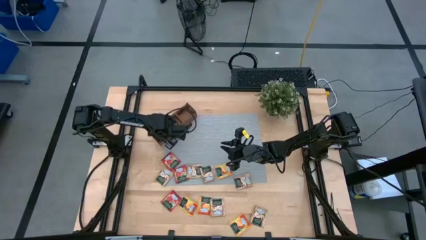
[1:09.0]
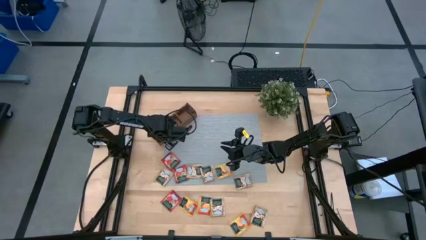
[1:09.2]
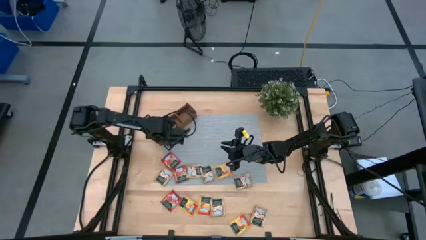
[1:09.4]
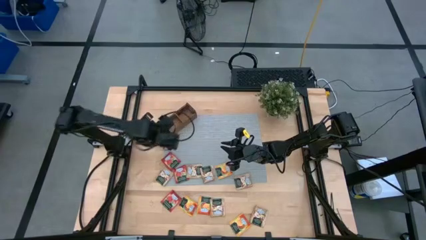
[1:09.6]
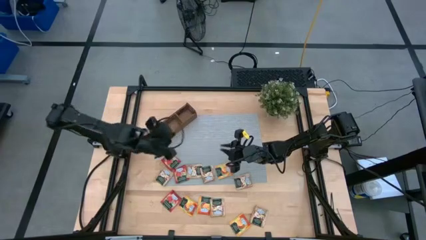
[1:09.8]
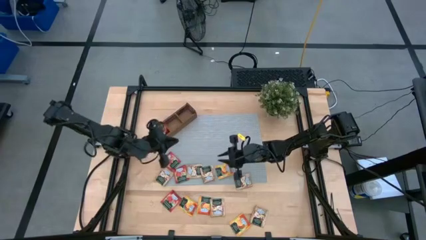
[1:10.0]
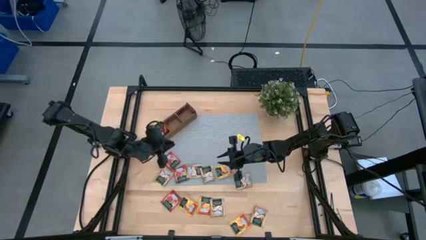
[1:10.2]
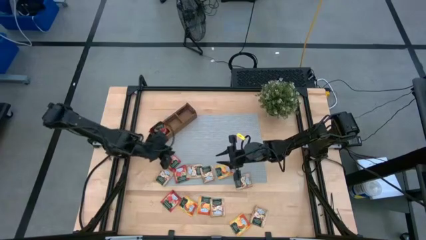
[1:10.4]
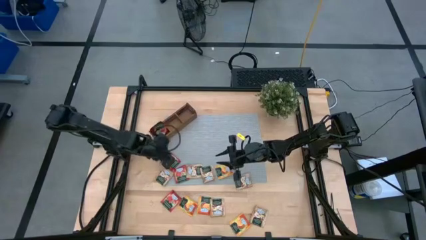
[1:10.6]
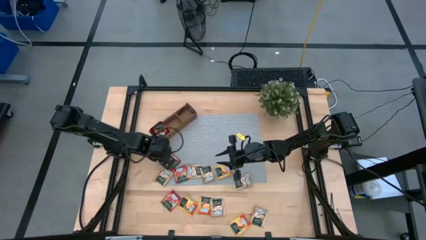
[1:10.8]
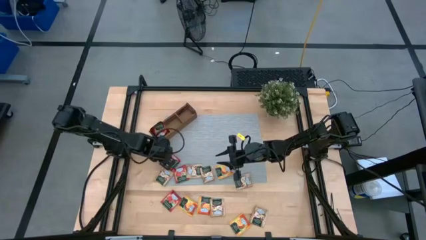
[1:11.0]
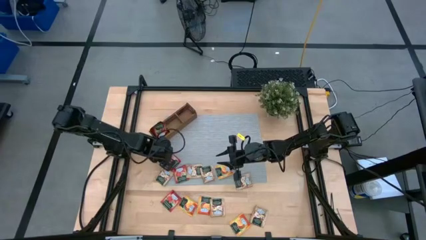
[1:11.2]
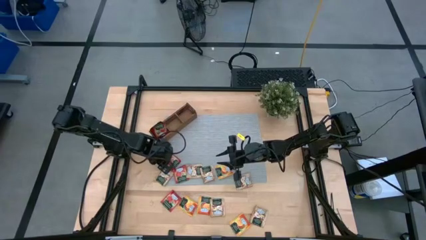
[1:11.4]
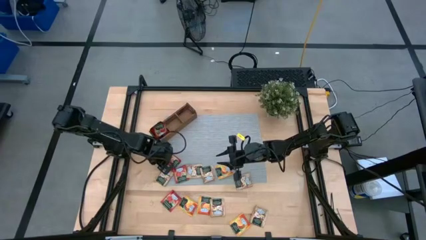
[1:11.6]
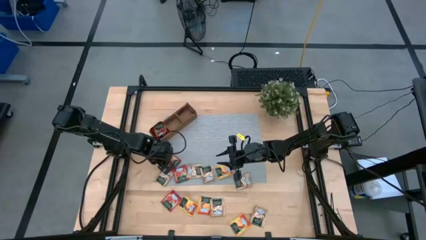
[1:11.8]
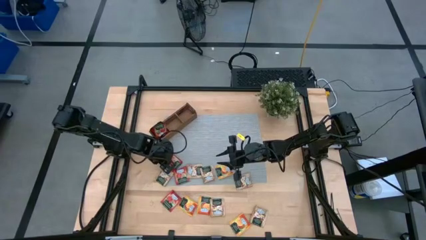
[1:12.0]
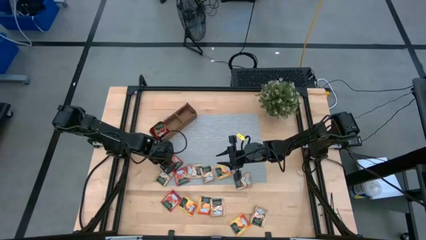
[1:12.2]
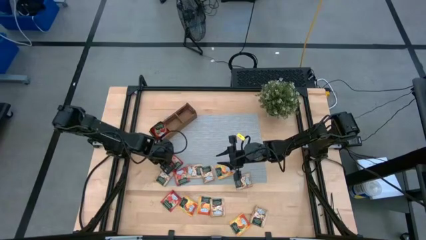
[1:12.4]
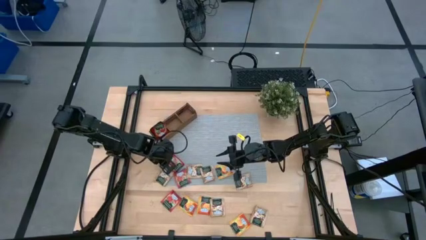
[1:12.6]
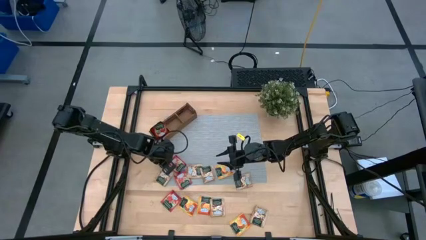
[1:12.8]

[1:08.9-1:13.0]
Task: Pick & Place Tea
Put the red tea bag into the left section of the wooden organizer

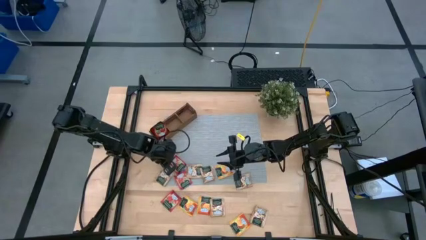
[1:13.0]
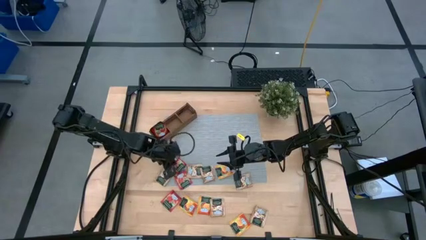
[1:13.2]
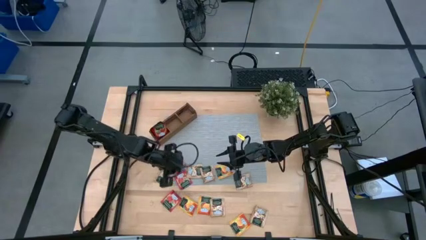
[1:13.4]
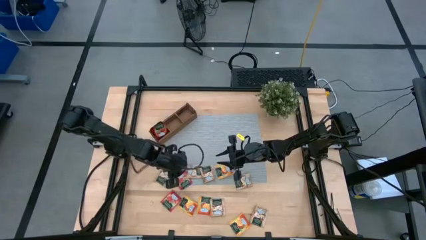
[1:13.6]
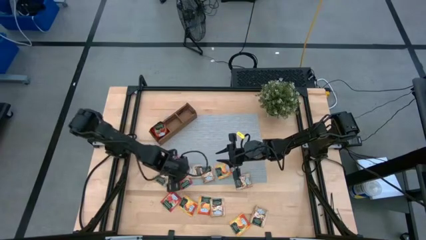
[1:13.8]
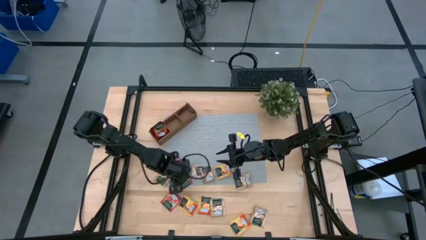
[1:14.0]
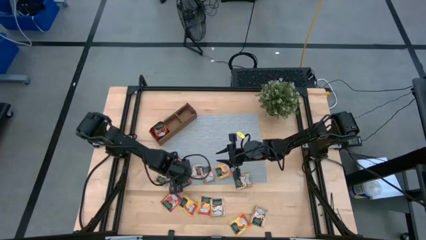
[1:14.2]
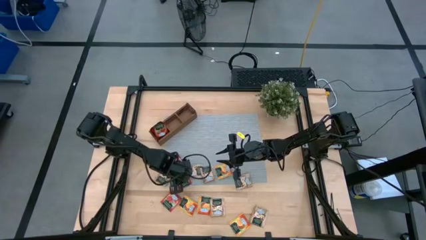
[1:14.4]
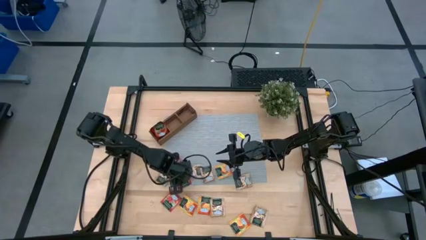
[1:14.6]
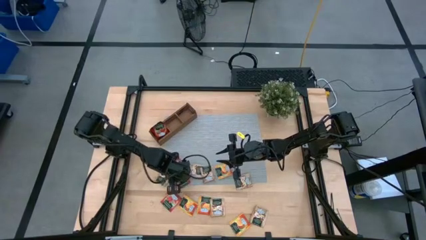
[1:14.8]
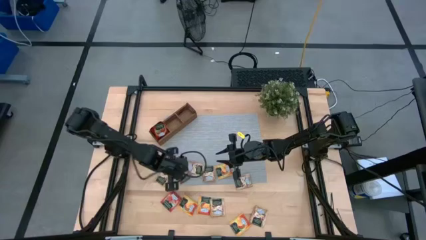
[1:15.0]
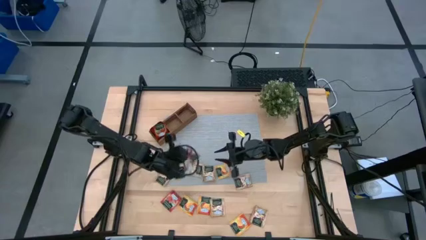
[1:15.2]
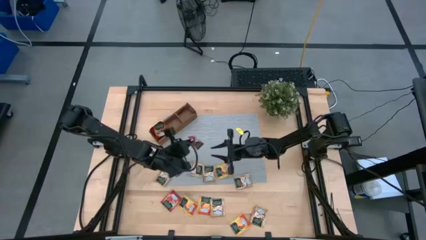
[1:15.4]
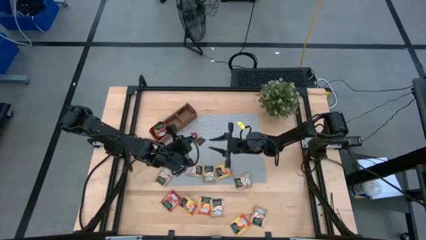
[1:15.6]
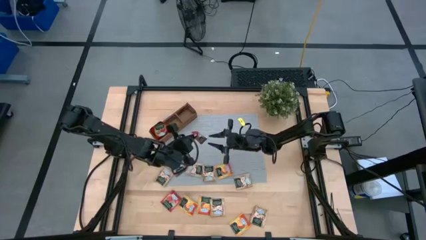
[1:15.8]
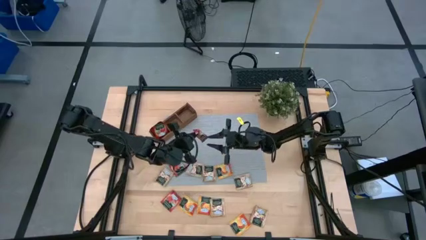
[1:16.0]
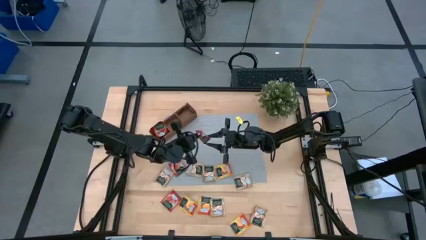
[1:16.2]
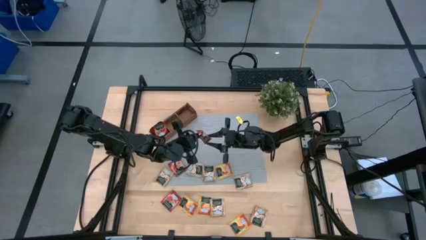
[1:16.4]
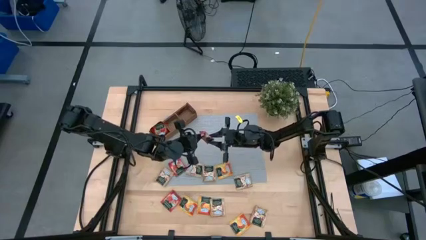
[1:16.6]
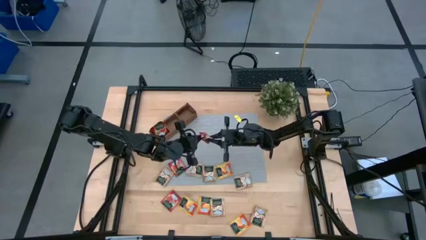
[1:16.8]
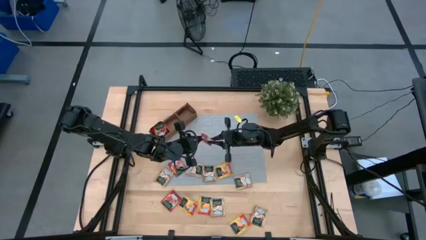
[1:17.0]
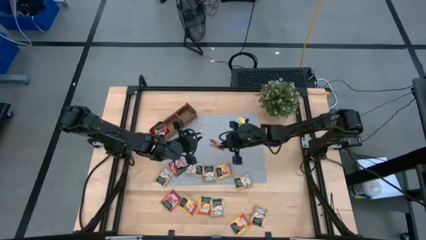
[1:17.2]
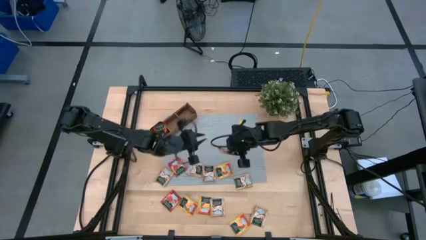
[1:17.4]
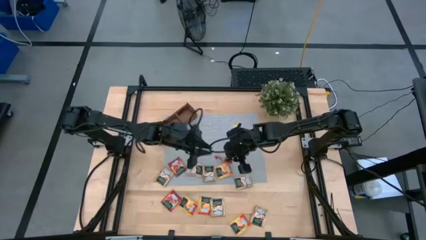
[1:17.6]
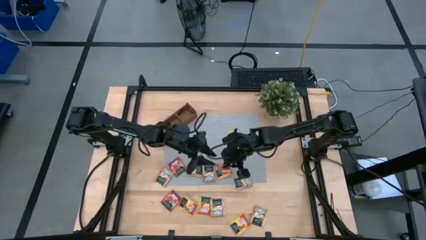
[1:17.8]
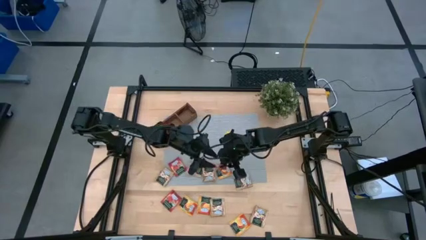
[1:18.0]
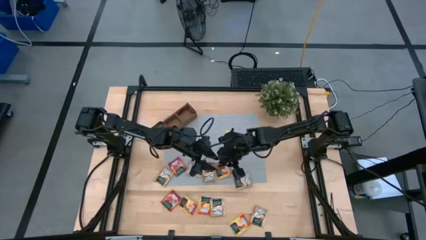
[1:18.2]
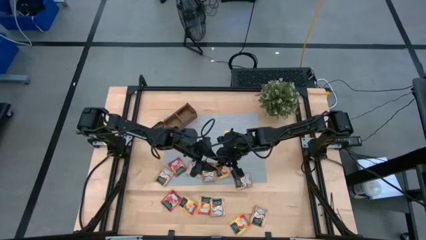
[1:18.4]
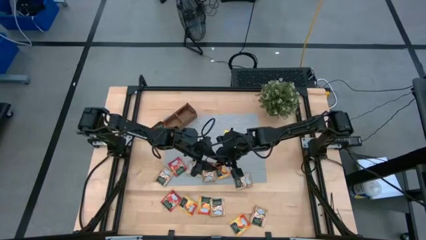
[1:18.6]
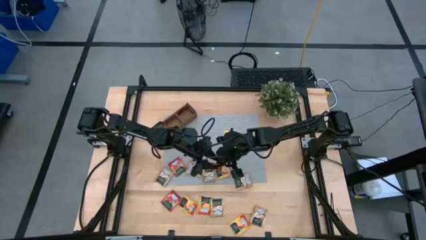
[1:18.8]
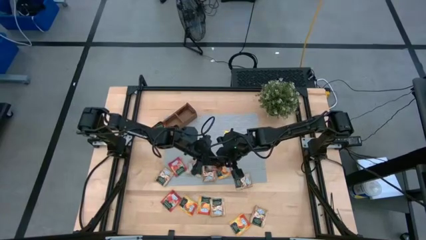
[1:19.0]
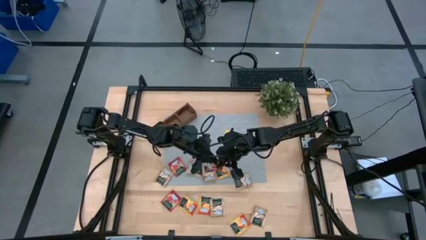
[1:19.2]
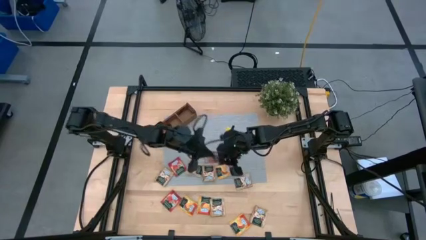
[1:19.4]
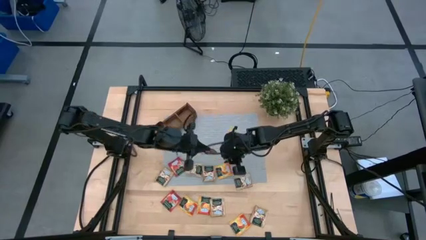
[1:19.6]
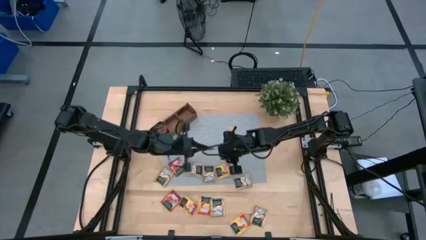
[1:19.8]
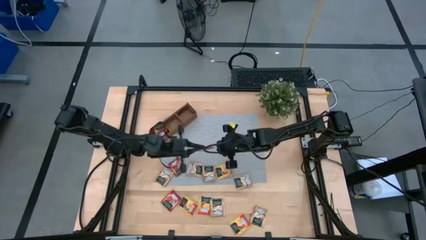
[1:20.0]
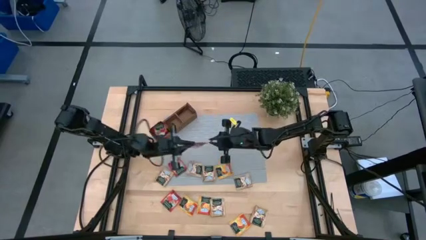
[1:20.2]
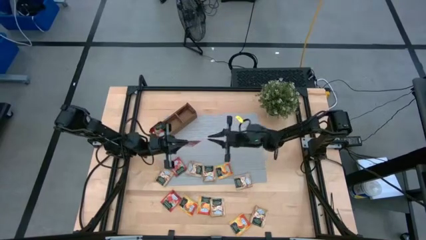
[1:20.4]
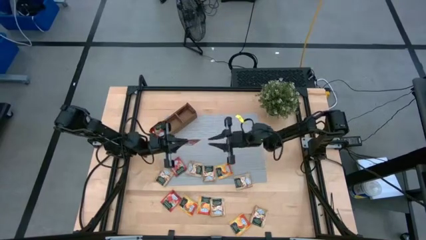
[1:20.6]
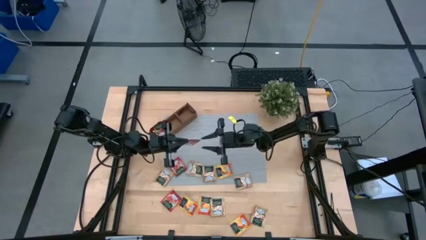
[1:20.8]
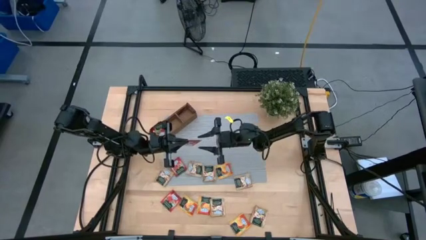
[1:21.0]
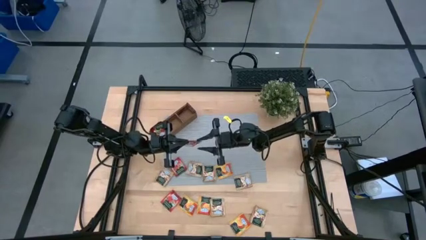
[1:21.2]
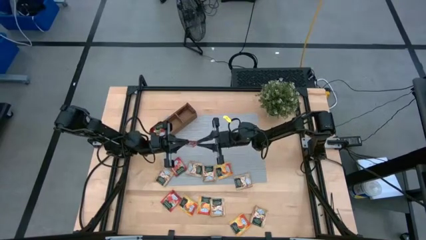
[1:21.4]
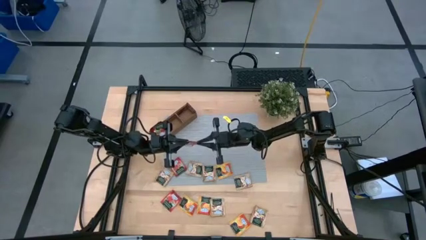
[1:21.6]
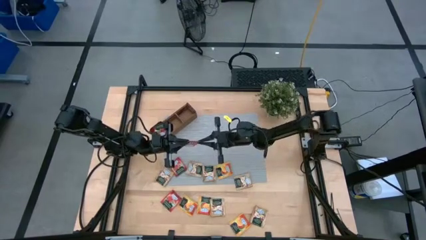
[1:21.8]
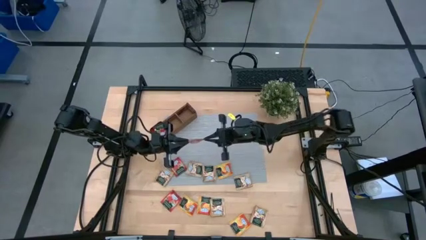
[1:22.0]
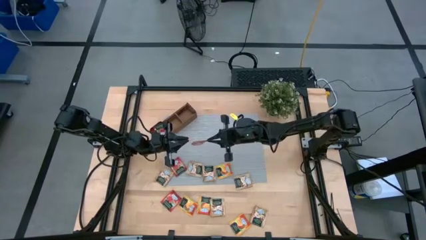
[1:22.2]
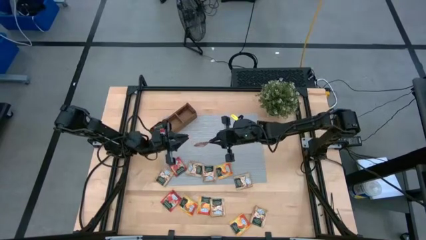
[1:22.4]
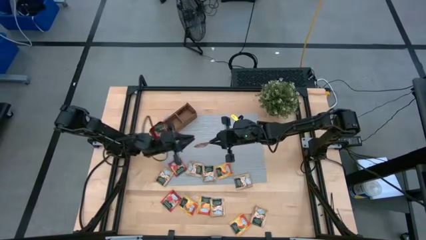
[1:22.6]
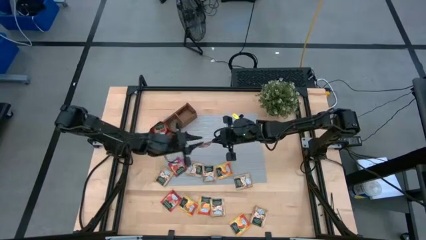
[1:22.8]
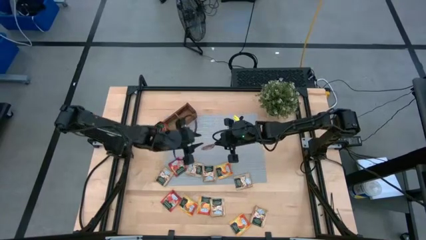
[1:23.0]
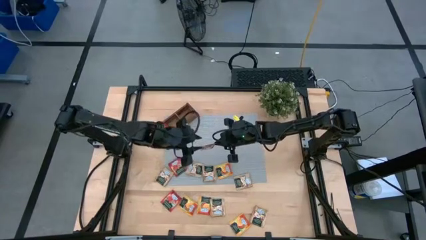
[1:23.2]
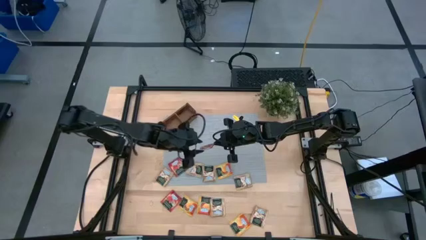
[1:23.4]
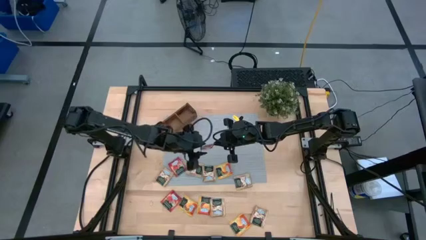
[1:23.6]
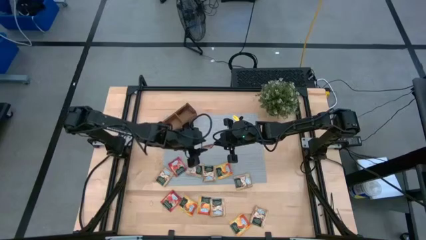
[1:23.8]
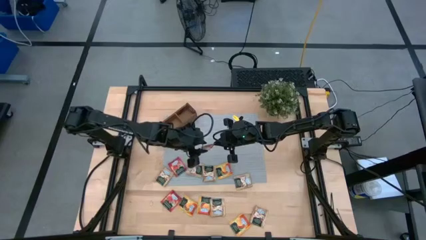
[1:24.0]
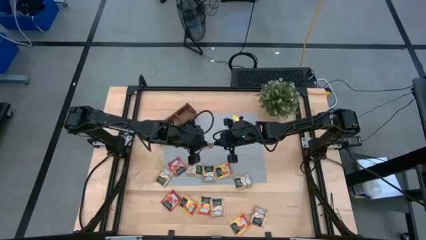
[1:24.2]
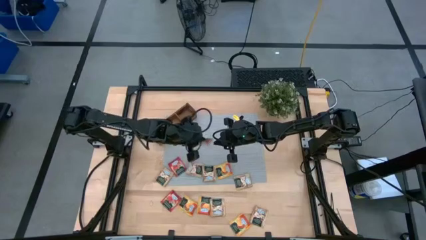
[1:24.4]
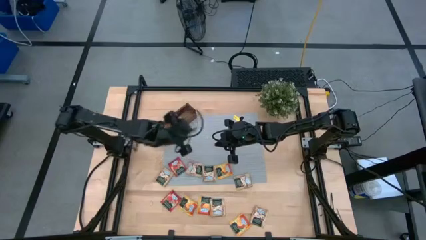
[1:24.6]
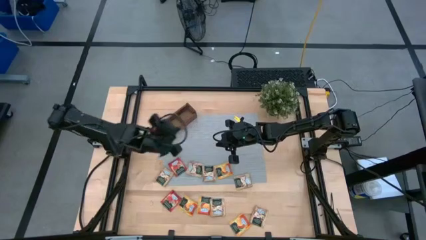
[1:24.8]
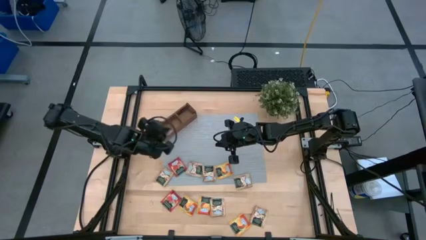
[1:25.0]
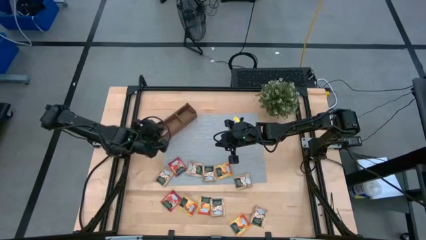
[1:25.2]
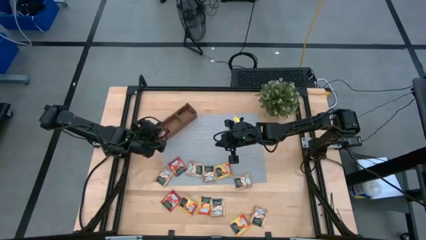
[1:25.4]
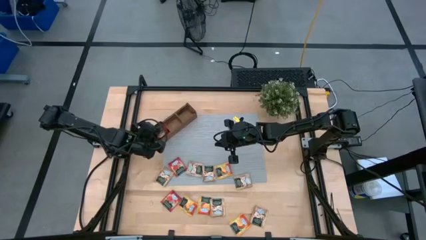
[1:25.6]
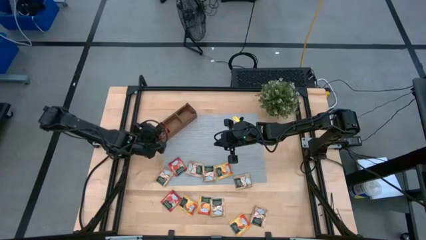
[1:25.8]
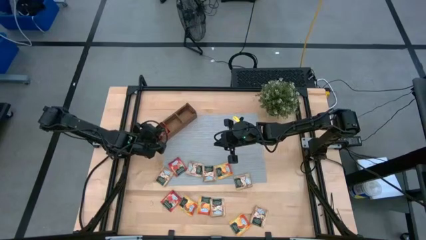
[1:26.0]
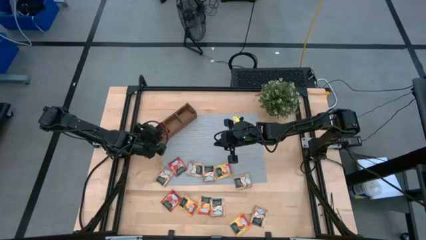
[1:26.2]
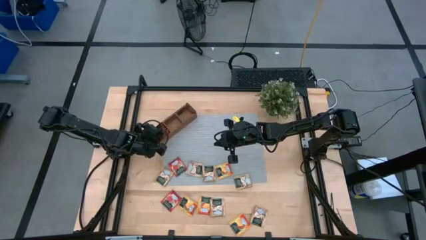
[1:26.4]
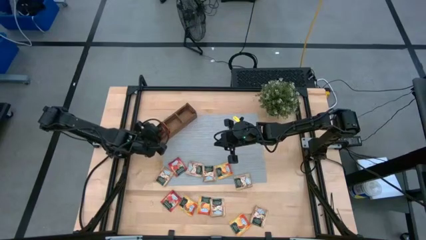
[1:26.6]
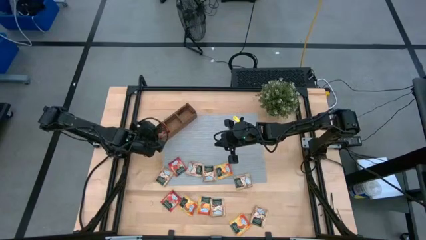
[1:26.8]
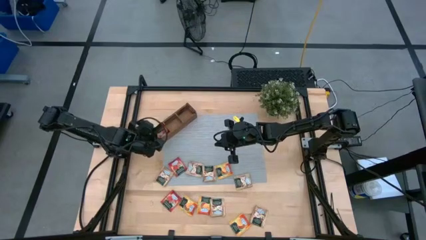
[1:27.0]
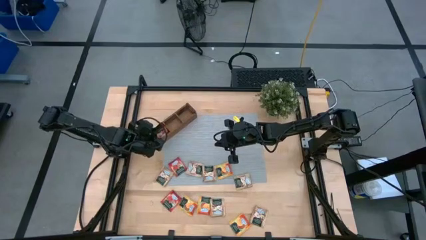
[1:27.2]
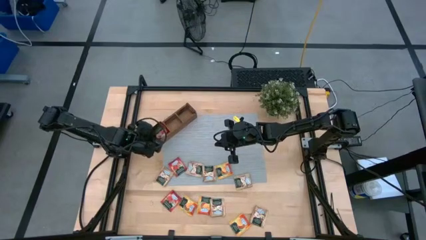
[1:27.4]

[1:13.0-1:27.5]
Put the red tea bag into the left section of the wooden organizer
